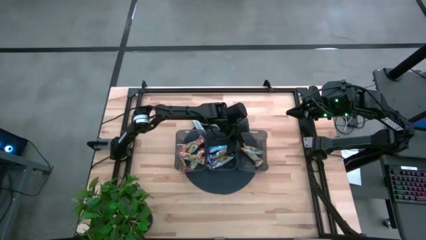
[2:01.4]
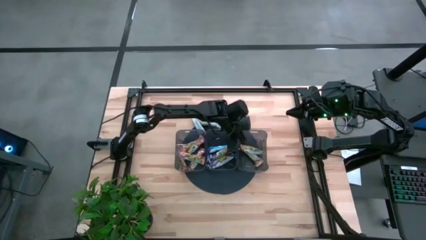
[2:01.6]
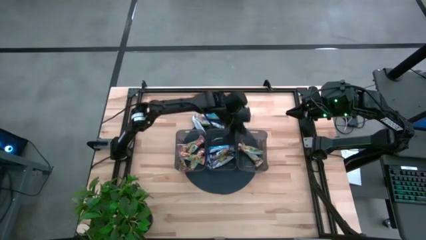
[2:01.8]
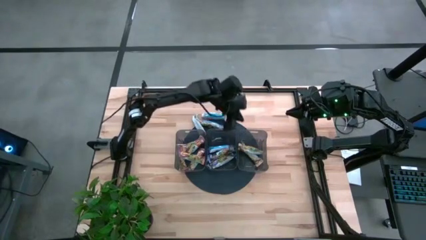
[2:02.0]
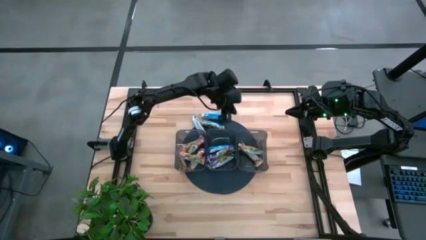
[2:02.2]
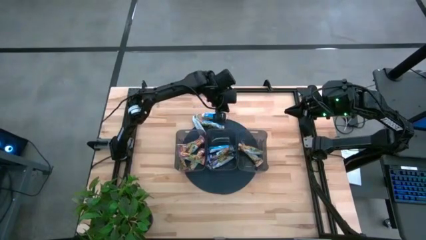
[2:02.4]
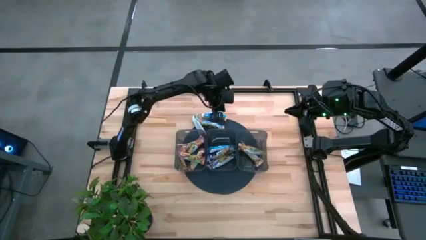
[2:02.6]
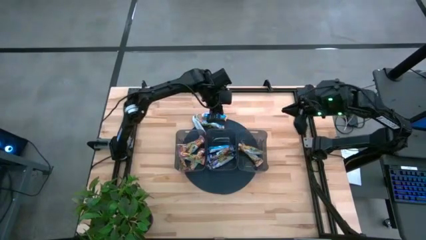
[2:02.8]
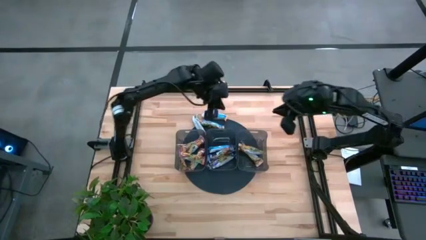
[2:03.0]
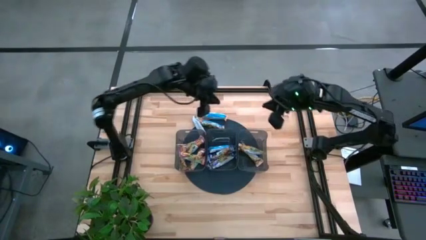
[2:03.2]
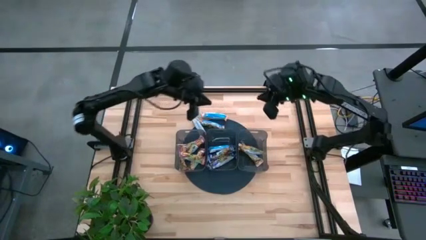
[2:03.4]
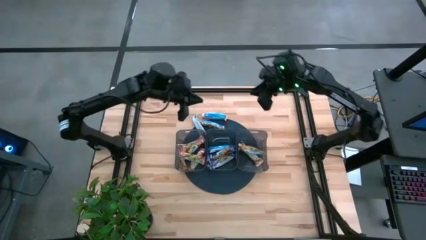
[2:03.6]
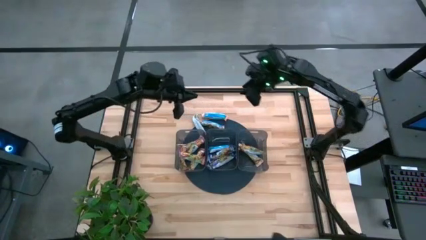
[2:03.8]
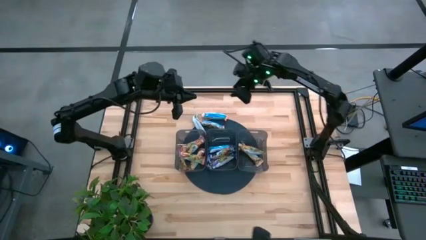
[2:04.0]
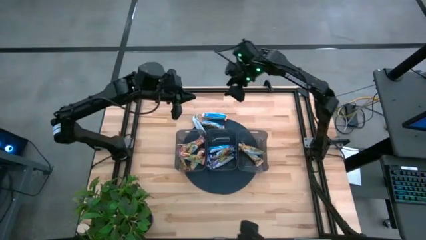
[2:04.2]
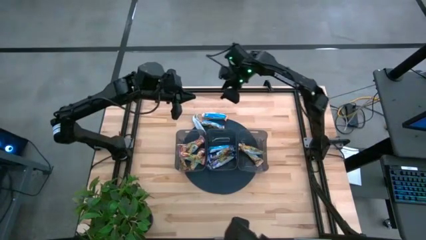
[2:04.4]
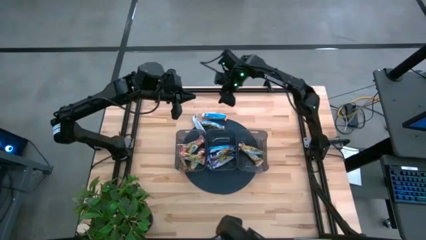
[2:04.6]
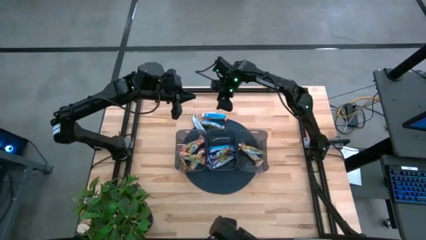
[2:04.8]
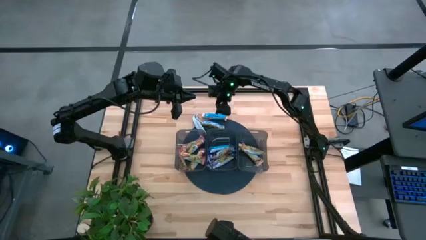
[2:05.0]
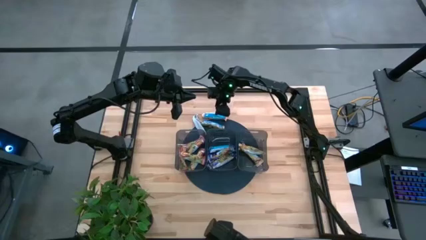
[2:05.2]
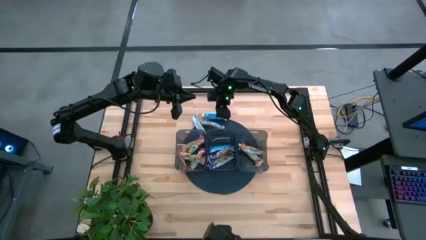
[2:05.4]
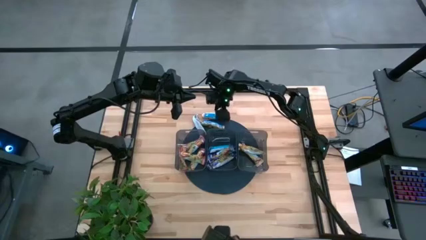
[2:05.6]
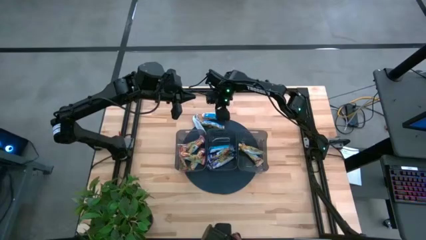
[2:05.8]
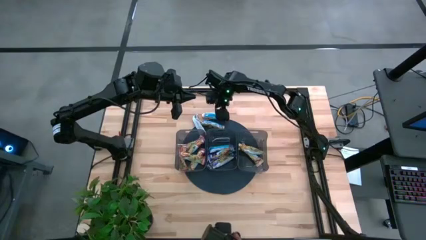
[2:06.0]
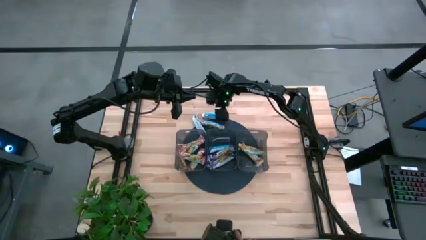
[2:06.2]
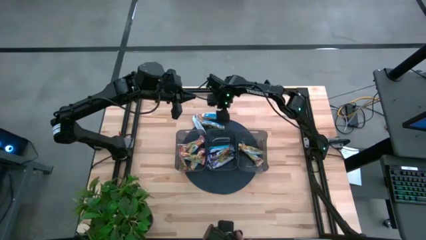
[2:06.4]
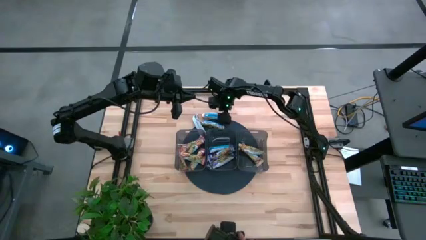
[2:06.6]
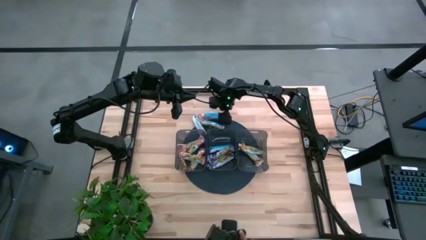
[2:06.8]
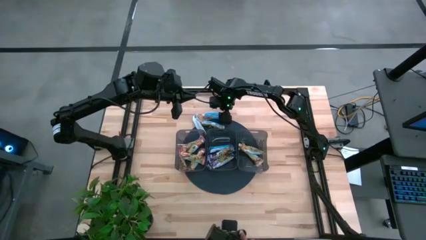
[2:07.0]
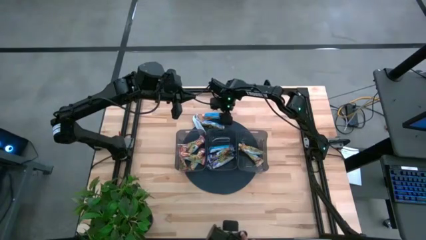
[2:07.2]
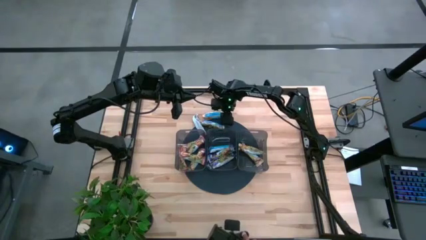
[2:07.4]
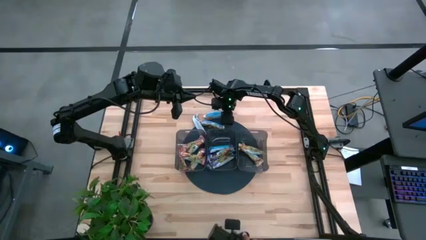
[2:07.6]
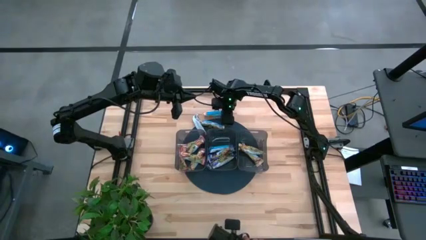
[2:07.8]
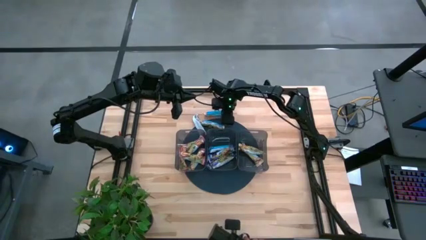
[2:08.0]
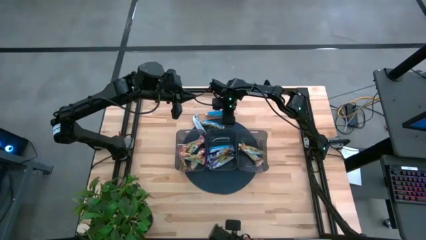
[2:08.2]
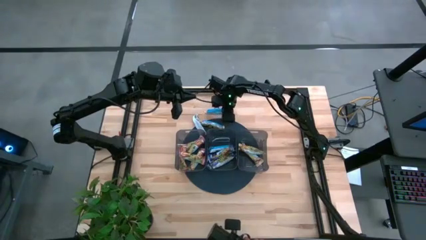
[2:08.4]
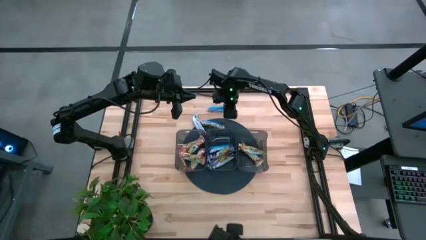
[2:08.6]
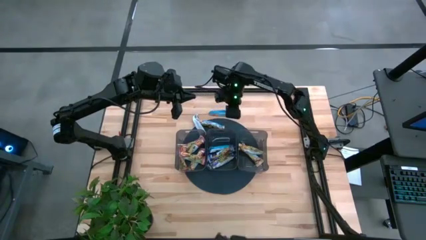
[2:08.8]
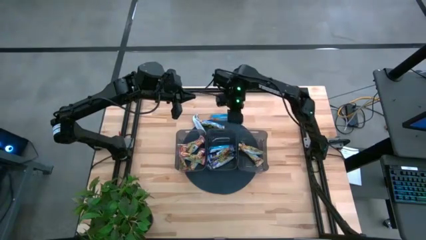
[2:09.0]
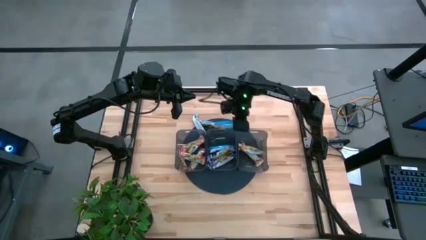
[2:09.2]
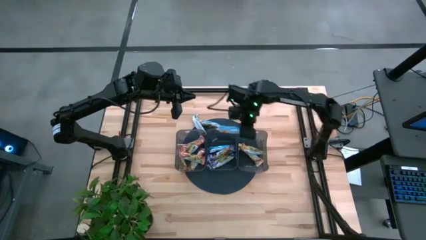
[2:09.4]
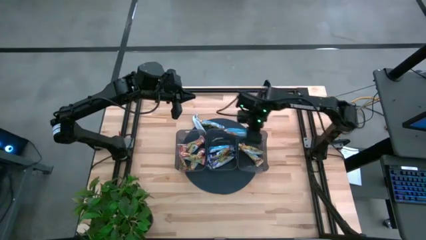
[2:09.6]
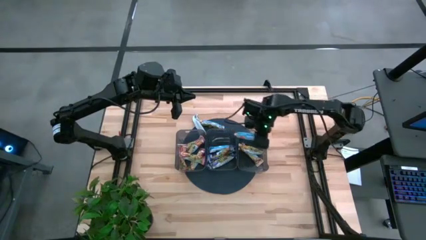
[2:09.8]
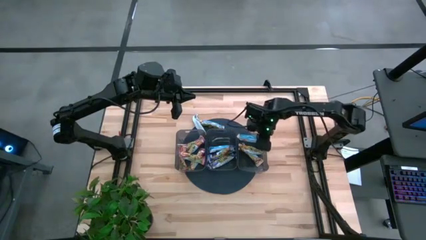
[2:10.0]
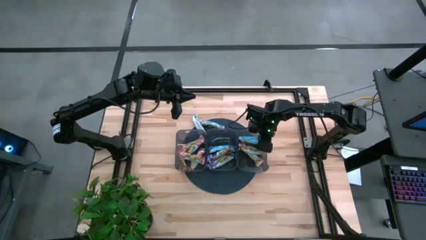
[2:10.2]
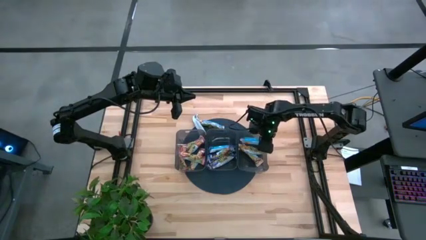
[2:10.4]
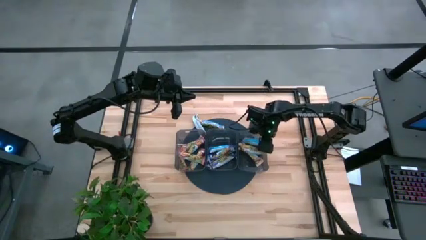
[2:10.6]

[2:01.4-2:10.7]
Task: Pick and place Granola Bars by type
Put the yellow granola bar into the right black bin

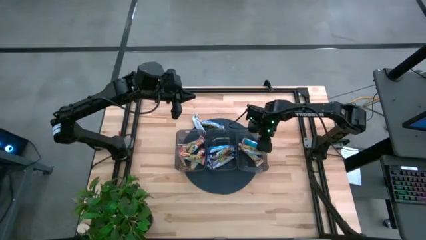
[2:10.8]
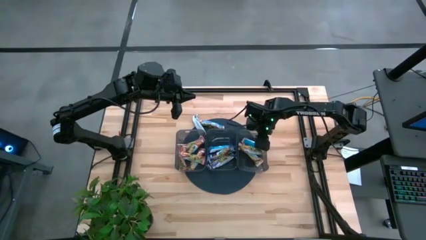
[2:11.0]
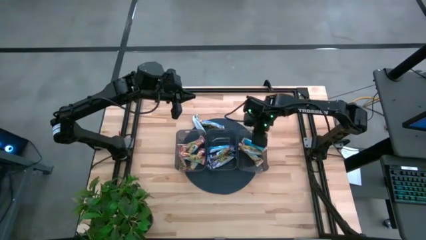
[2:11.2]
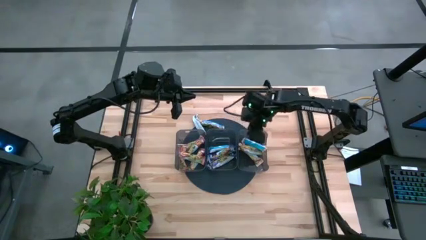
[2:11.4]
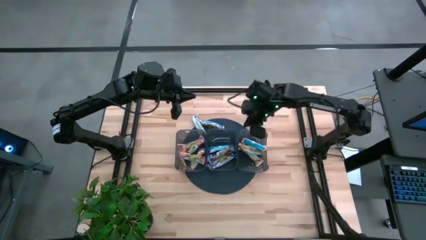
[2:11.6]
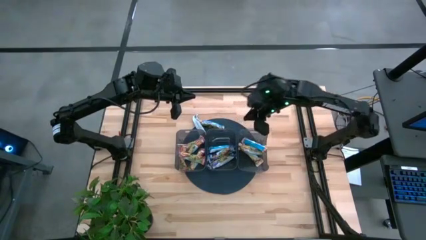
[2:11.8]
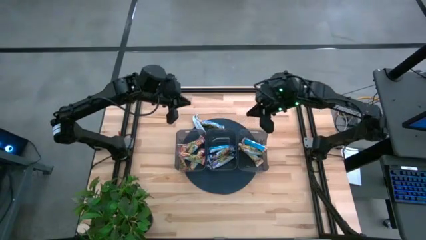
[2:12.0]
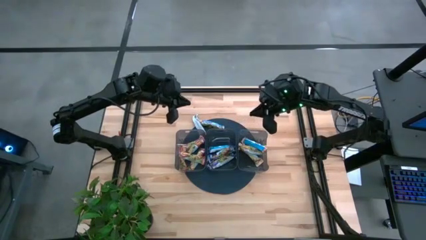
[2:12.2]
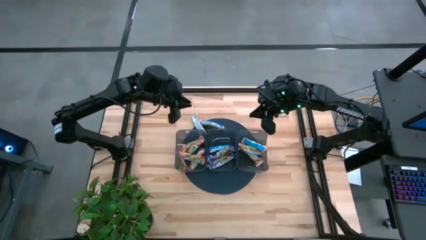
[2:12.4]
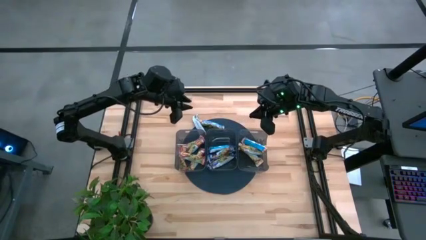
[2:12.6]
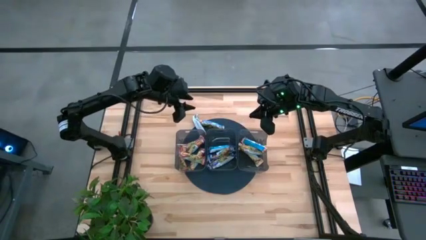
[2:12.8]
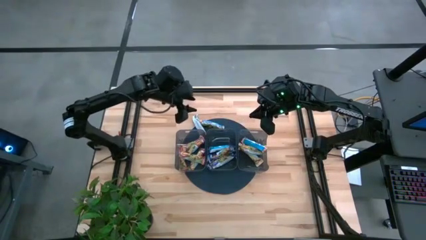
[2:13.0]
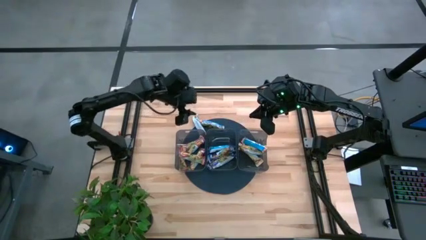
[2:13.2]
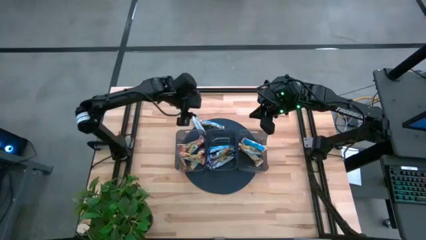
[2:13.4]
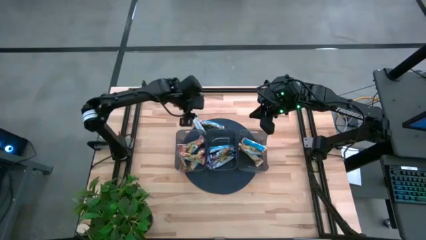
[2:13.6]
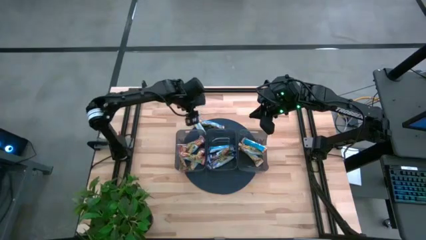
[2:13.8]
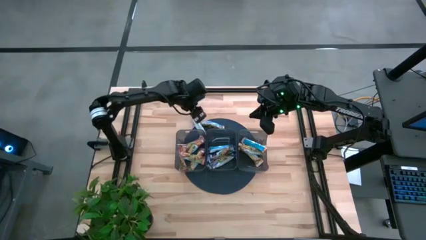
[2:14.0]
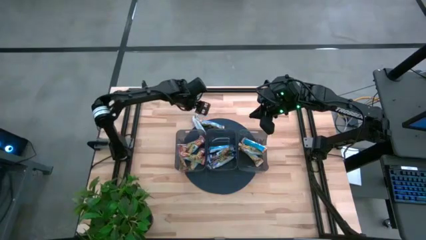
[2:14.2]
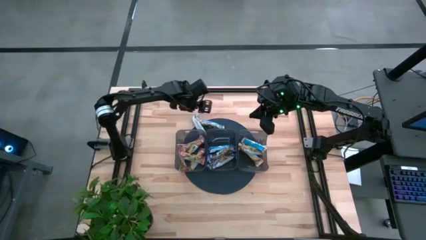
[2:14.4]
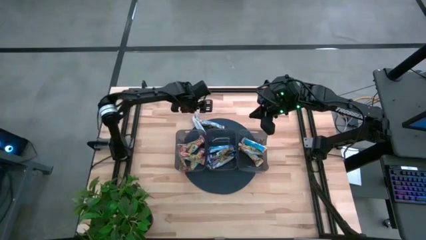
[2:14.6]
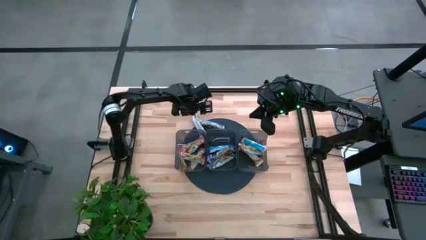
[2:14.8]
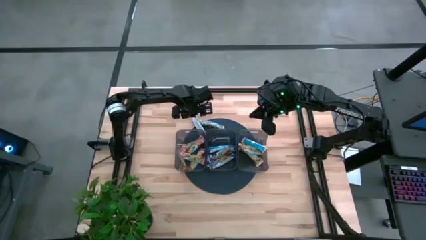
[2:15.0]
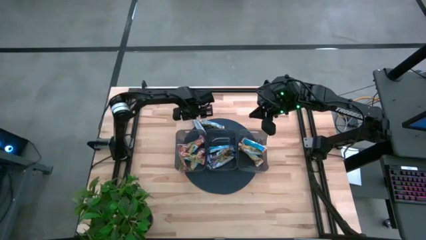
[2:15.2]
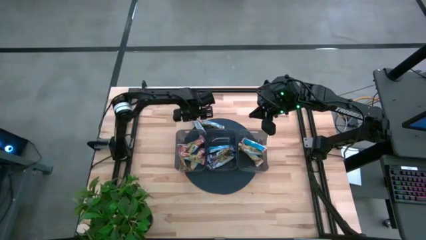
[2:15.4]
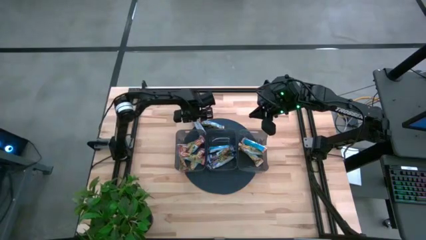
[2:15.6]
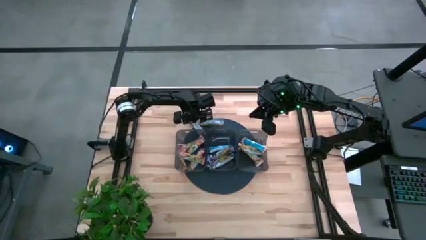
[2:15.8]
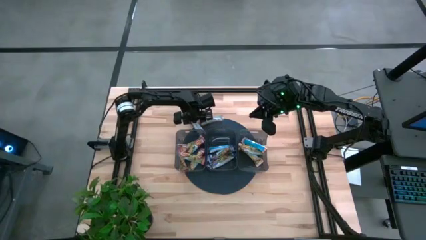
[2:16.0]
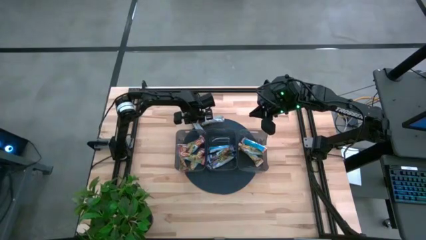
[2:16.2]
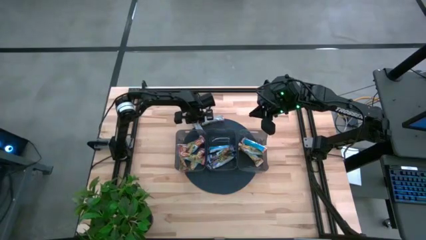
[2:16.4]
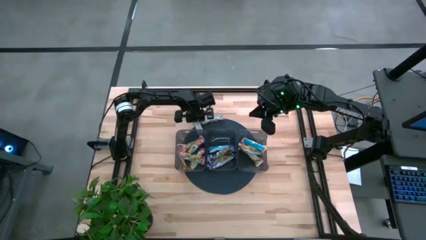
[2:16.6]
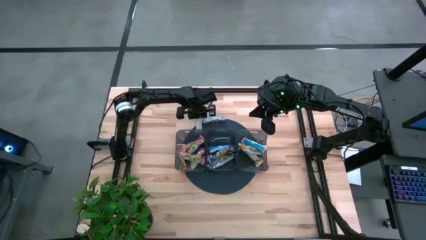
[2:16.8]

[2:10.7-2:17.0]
Put the yellow granola bar into the right black bin
